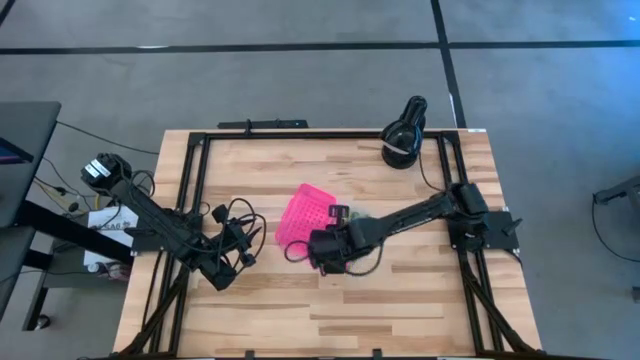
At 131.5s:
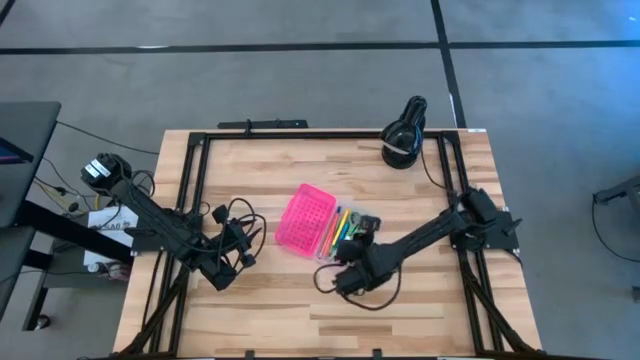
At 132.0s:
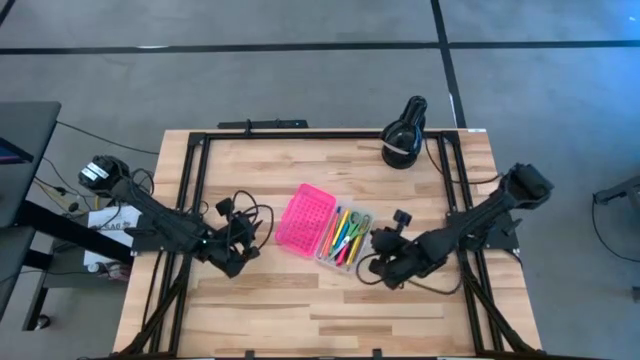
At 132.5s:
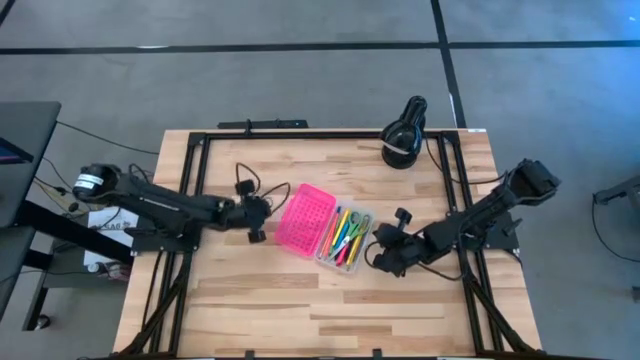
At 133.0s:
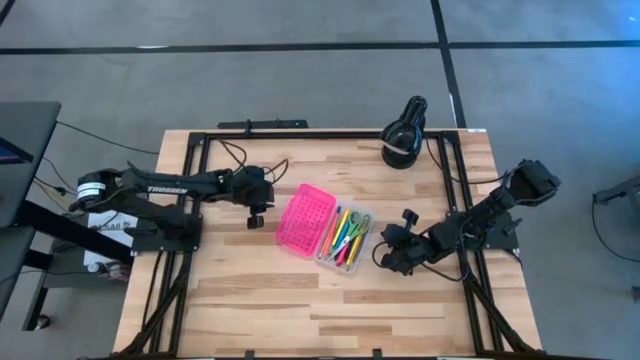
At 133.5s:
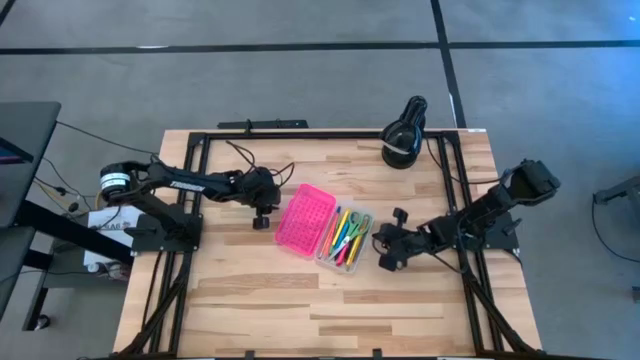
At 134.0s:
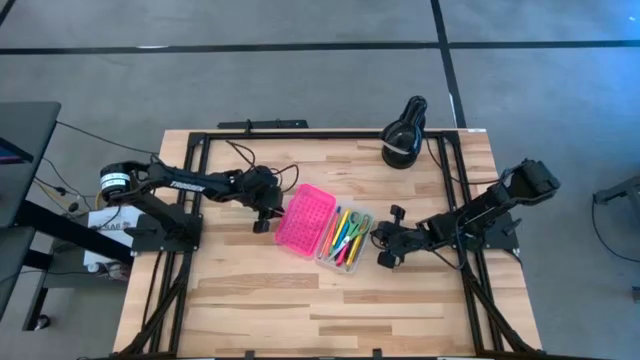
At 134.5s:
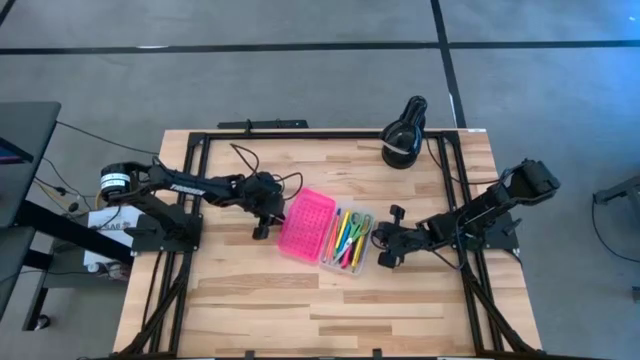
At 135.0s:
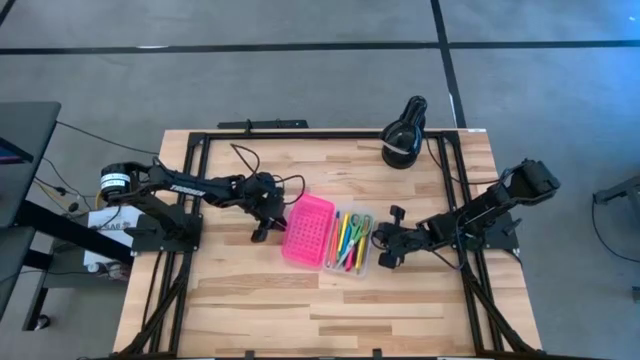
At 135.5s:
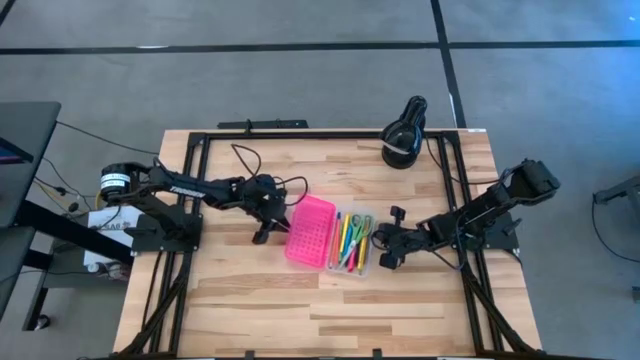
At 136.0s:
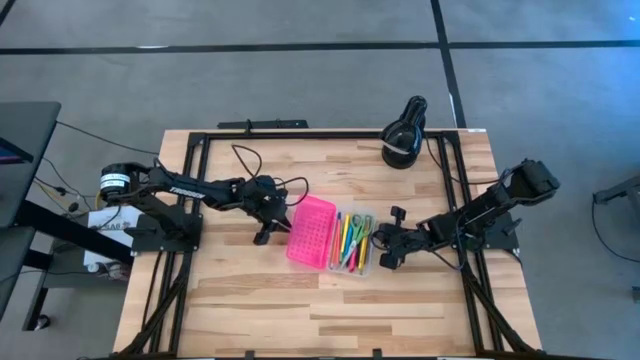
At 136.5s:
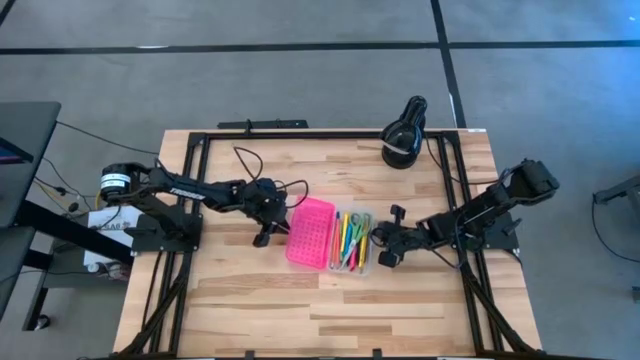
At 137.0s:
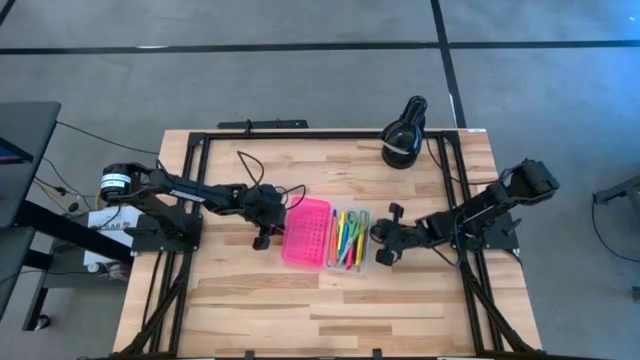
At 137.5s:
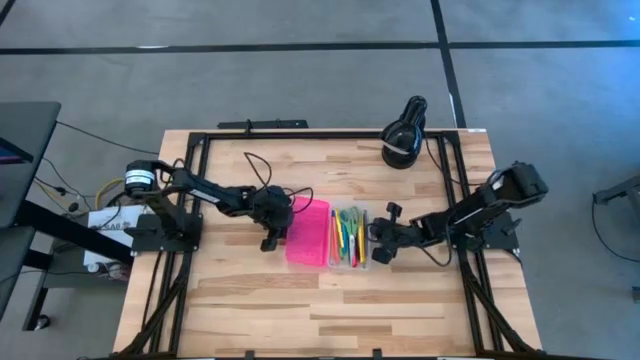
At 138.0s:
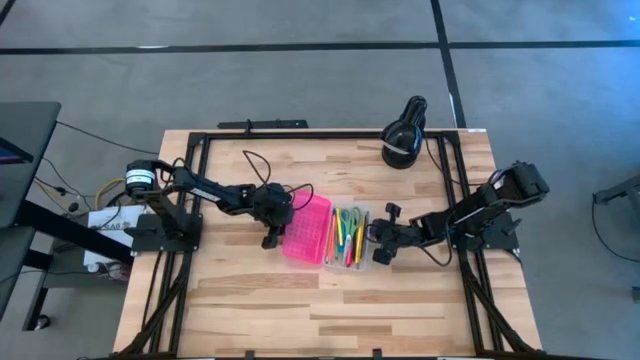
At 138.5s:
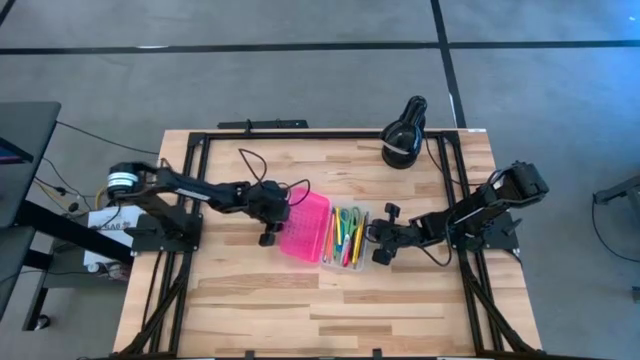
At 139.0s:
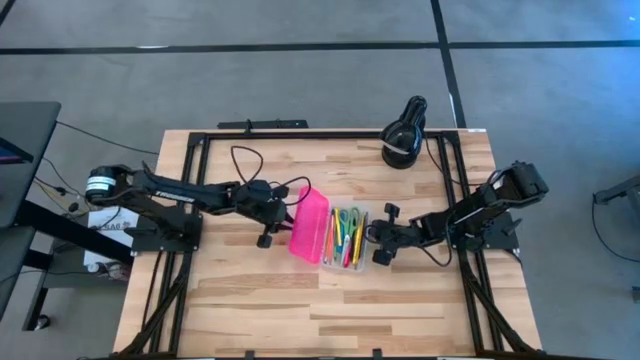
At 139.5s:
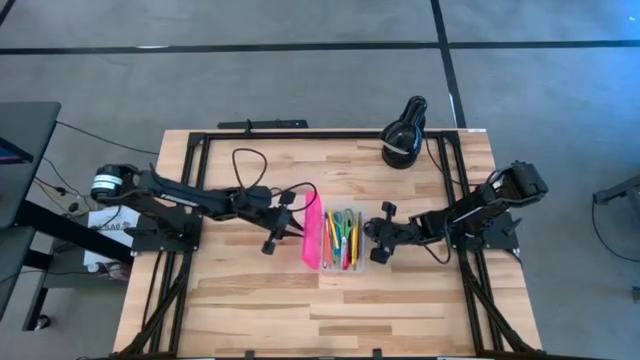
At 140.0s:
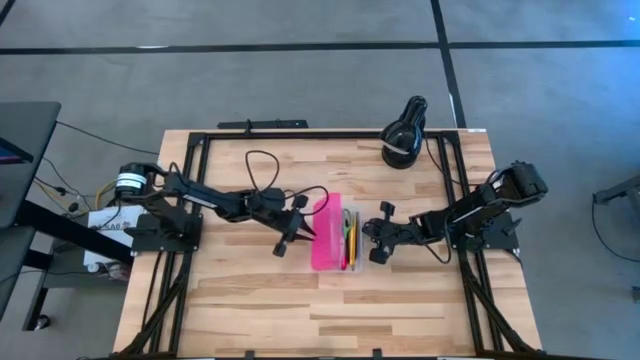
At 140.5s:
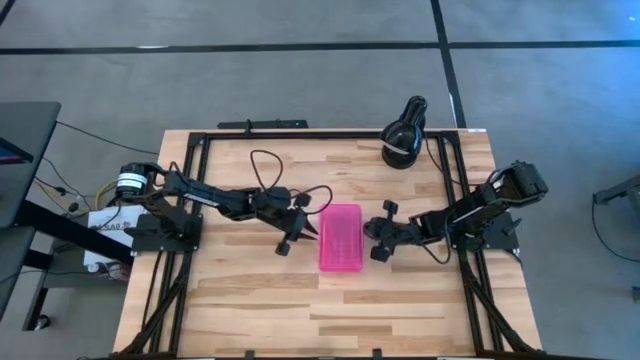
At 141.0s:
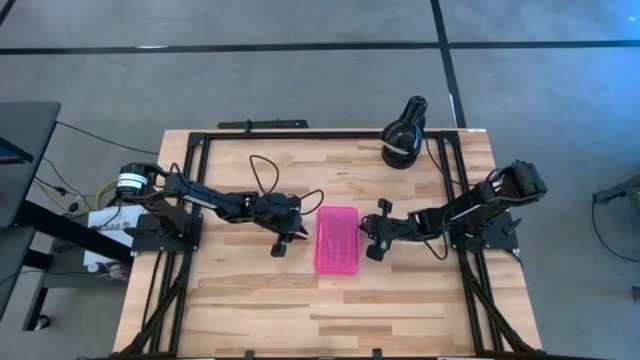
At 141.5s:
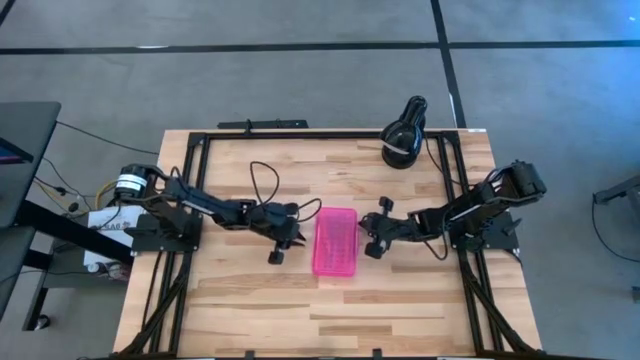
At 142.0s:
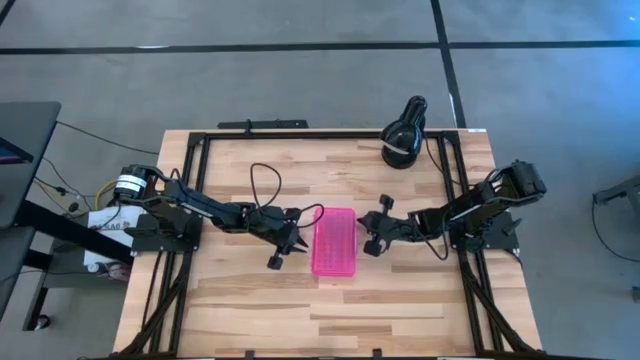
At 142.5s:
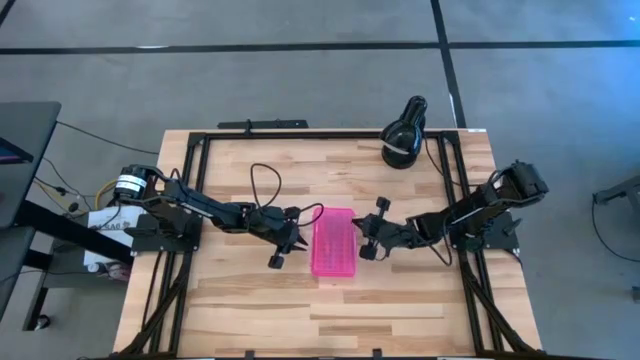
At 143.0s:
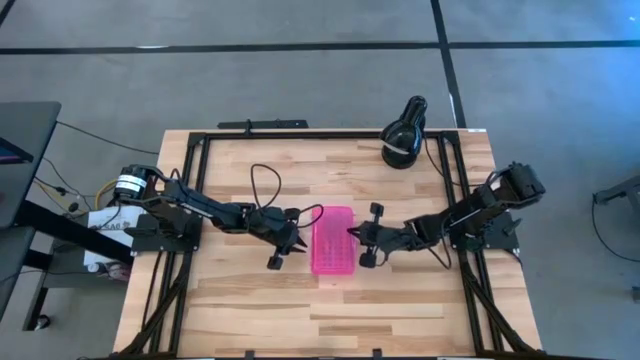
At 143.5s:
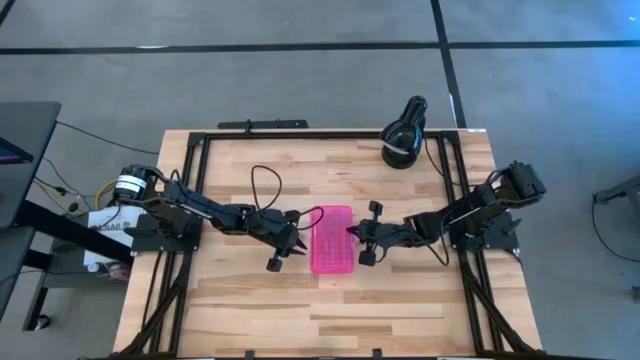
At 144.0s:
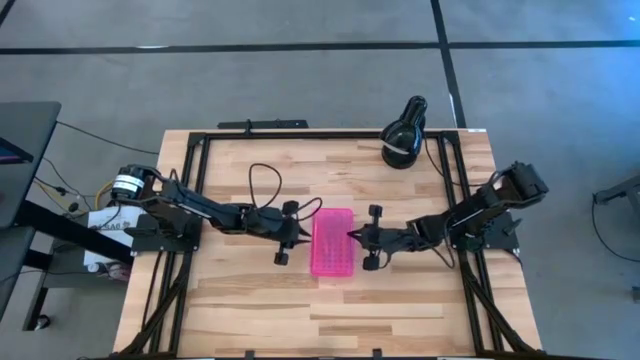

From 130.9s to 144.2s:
Task: Pick & place school supplies into a supply box
Close the pink supply box

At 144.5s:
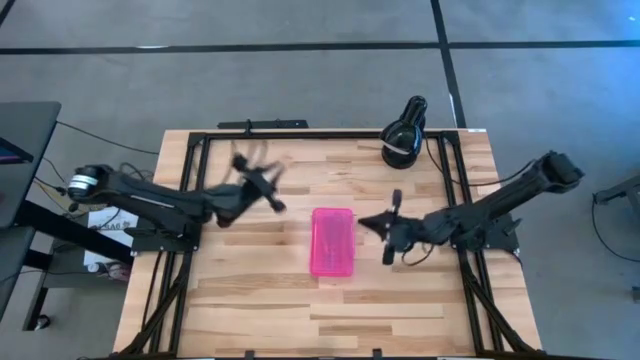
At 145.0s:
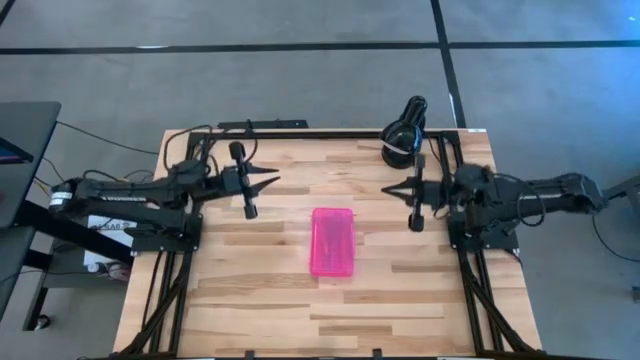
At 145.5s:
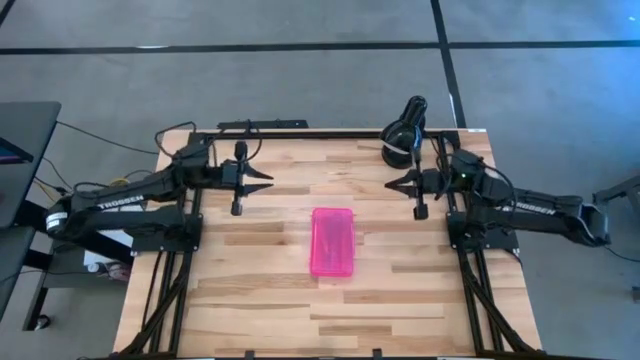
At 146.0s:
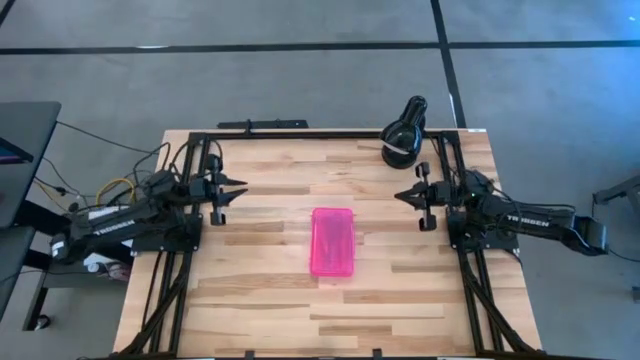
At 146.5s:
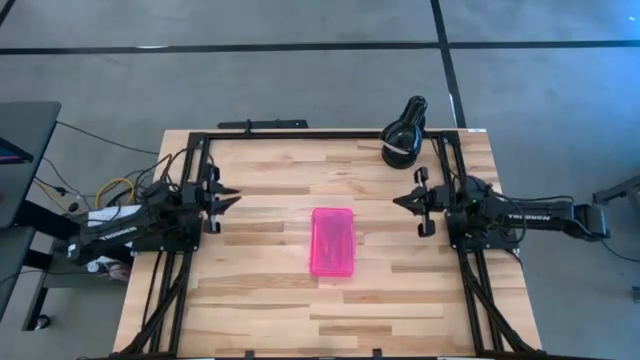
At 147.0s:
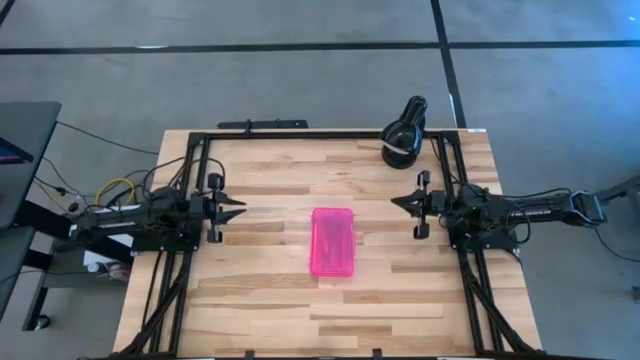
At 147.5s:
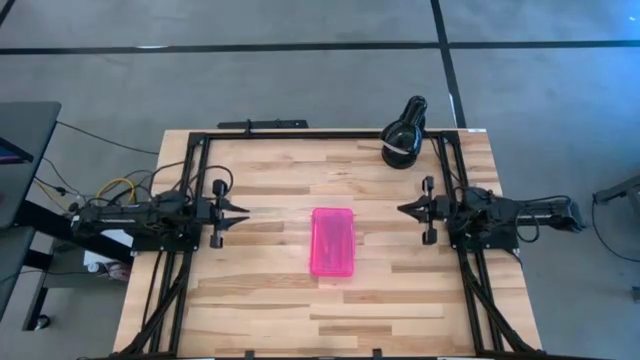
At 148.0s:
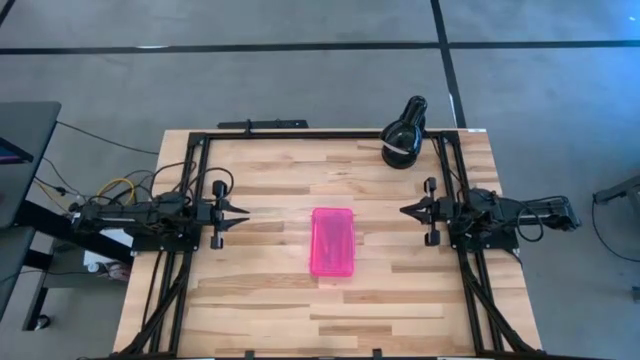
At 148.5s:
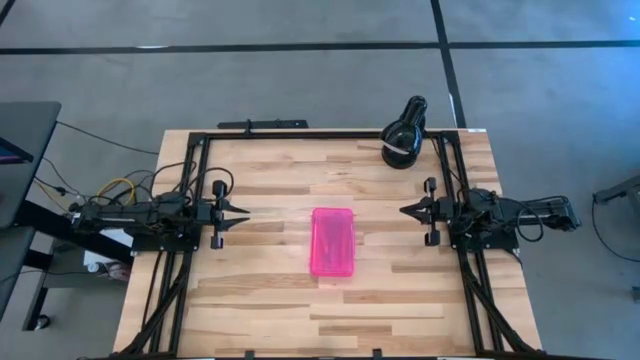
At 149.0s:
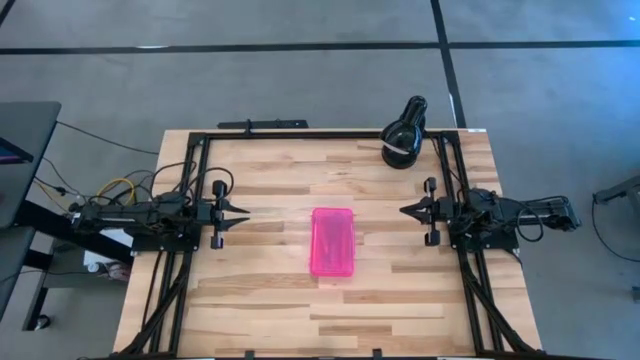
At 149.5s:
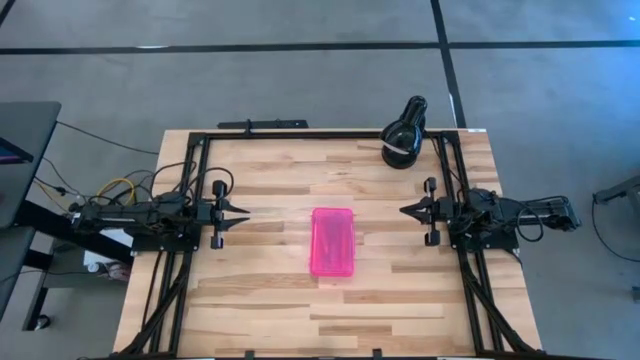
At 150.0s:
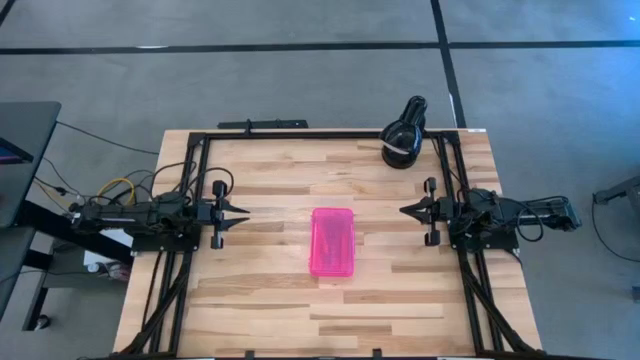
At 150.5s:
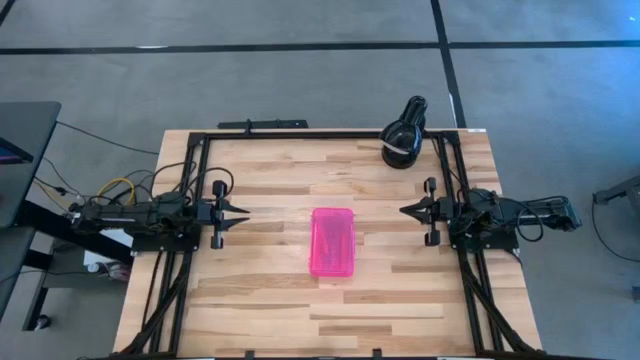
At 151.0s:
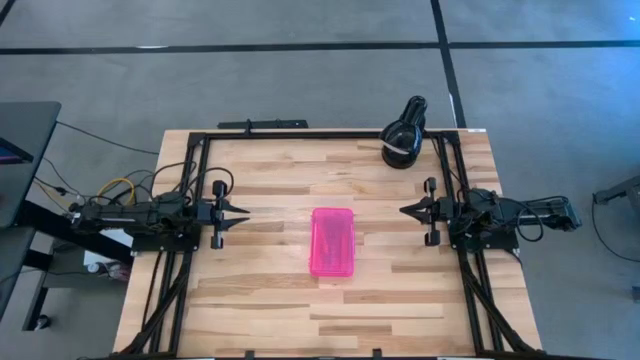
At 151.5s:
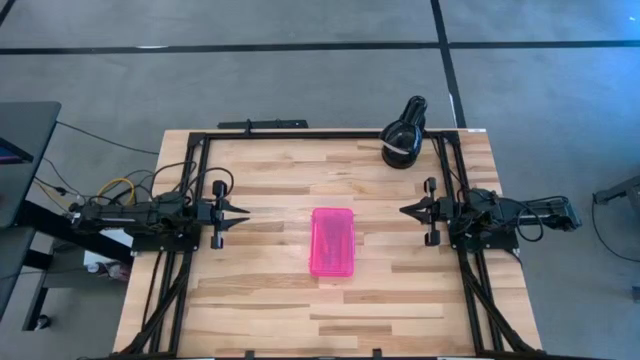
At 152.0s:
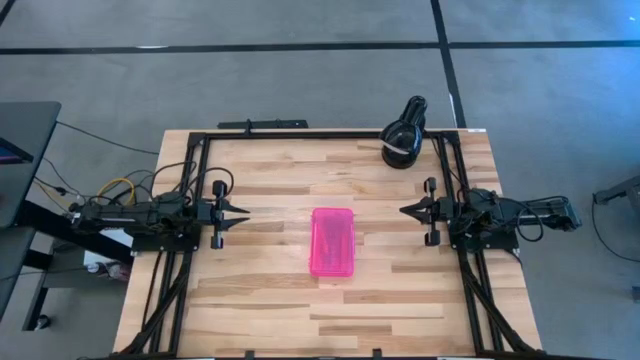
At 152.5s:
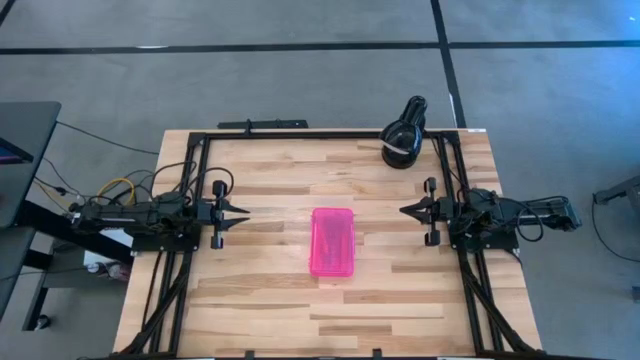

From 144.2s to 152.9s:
Return to Home Position
